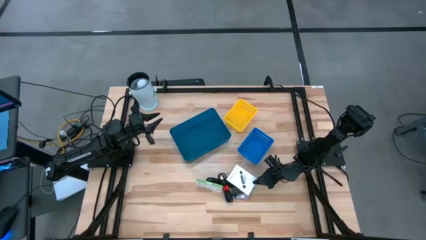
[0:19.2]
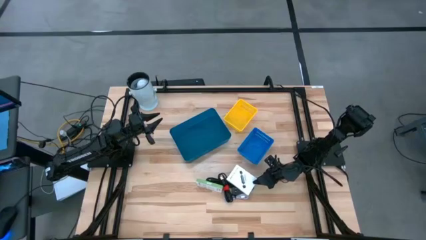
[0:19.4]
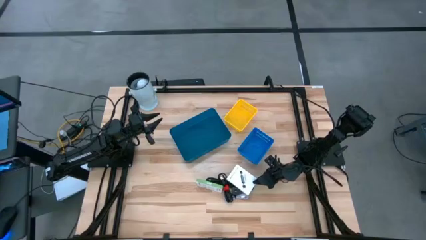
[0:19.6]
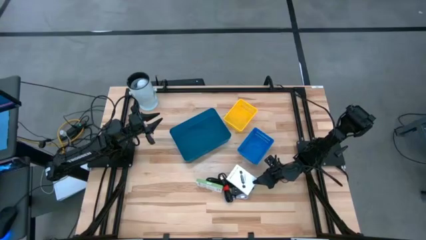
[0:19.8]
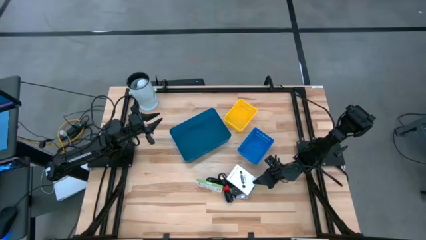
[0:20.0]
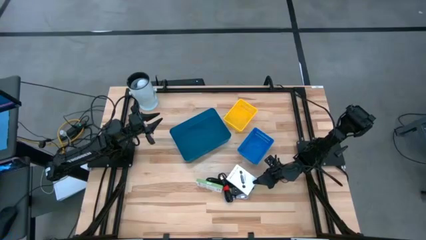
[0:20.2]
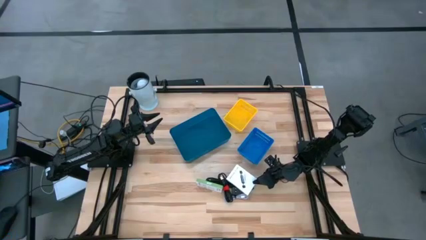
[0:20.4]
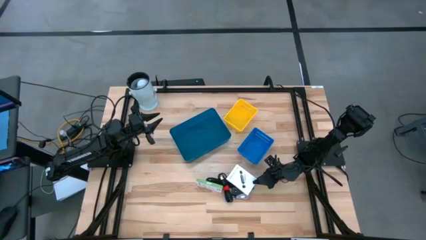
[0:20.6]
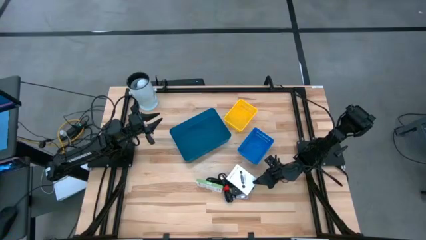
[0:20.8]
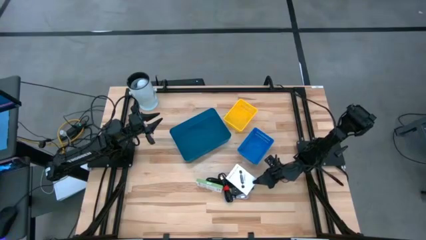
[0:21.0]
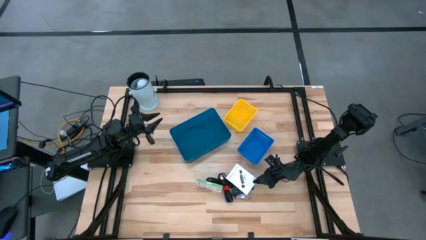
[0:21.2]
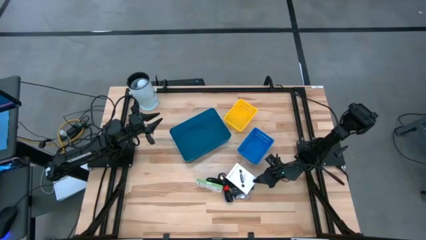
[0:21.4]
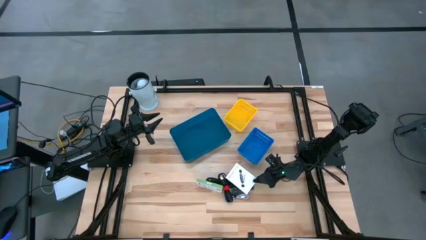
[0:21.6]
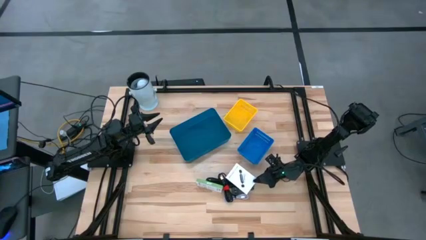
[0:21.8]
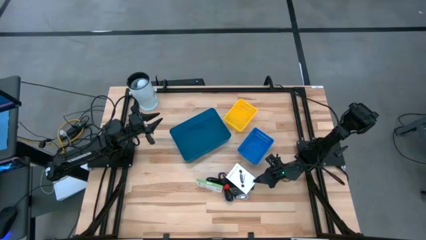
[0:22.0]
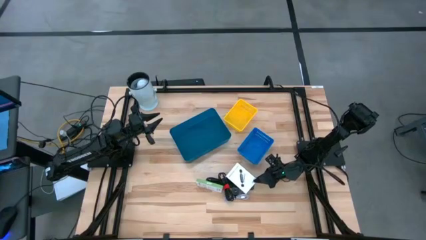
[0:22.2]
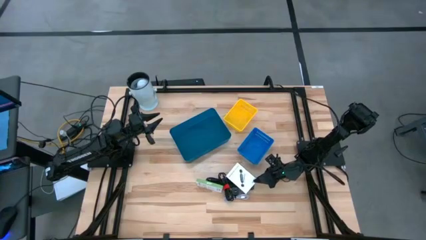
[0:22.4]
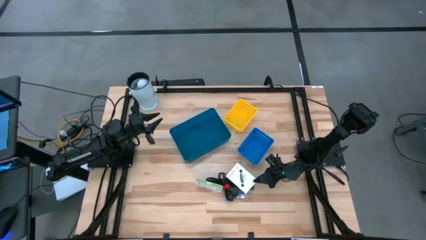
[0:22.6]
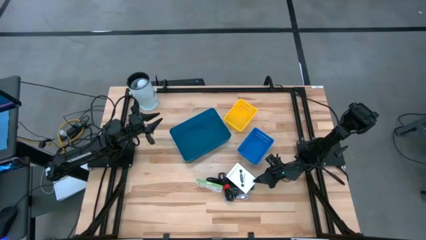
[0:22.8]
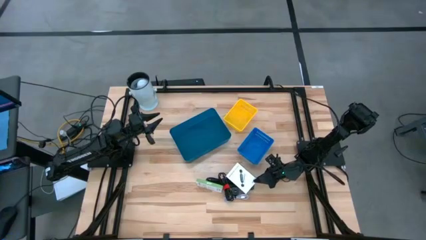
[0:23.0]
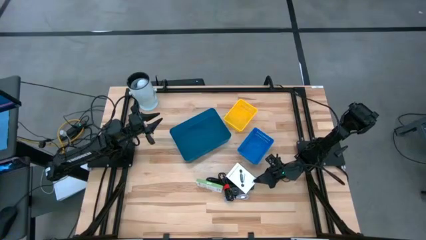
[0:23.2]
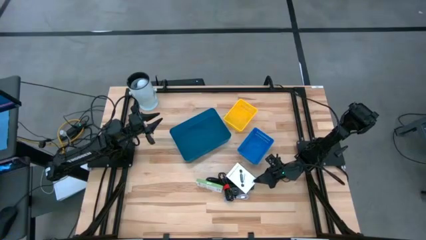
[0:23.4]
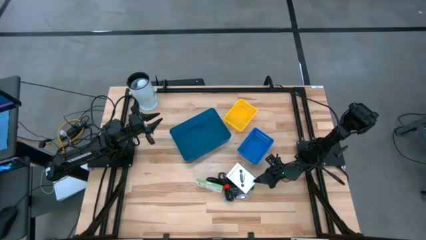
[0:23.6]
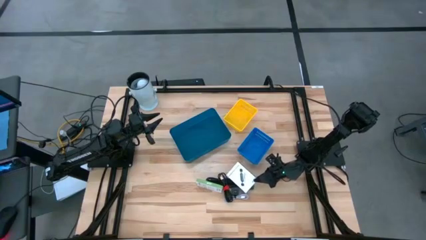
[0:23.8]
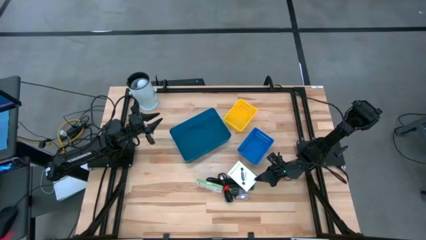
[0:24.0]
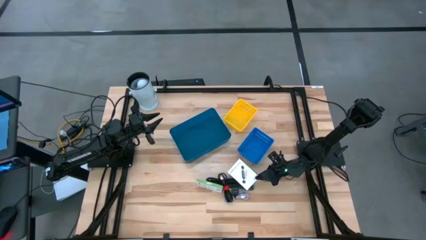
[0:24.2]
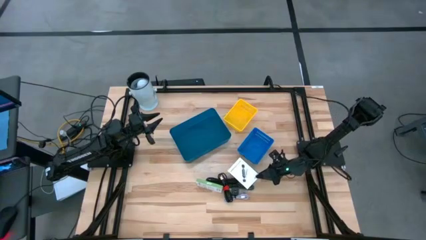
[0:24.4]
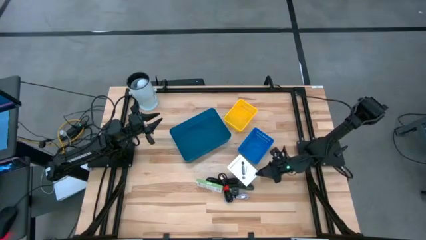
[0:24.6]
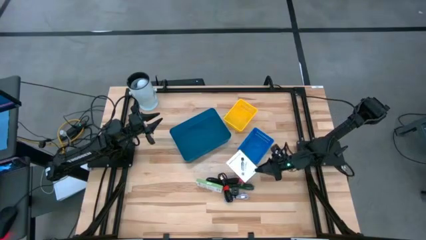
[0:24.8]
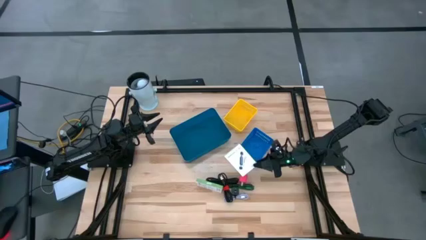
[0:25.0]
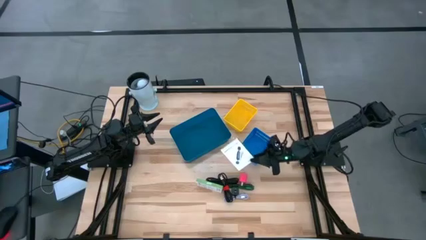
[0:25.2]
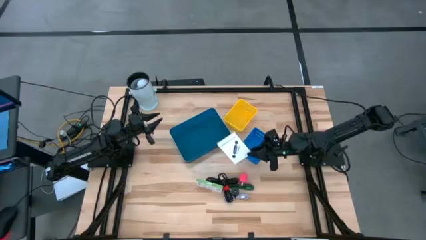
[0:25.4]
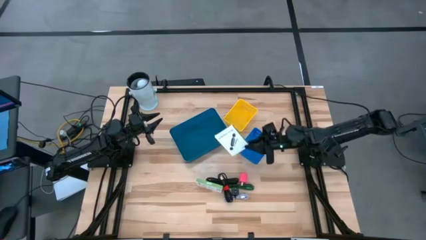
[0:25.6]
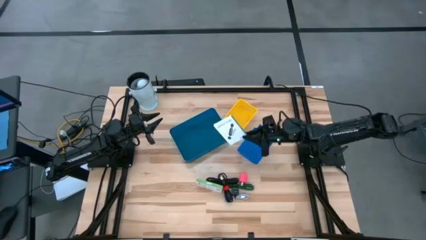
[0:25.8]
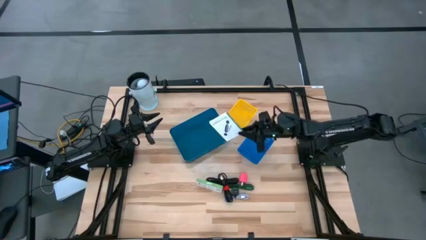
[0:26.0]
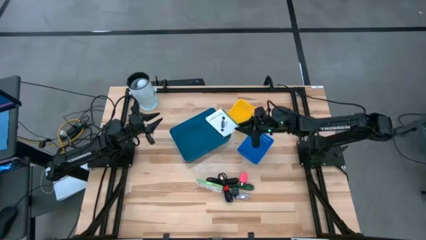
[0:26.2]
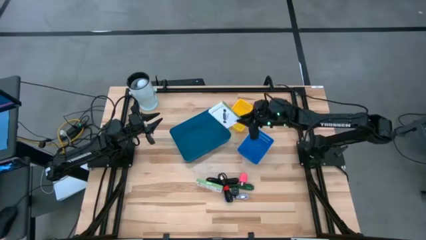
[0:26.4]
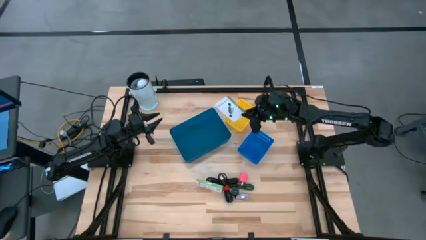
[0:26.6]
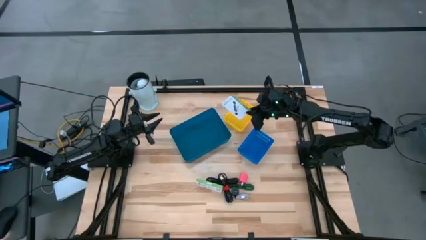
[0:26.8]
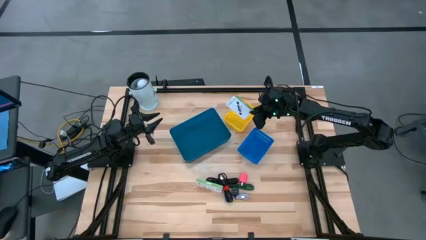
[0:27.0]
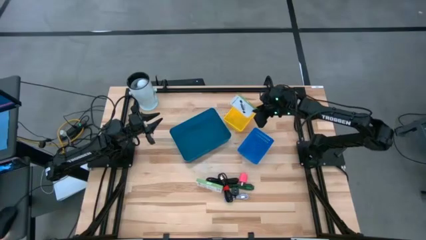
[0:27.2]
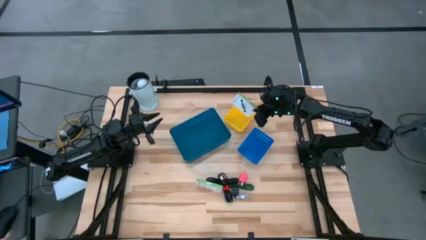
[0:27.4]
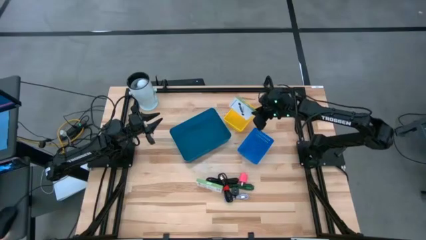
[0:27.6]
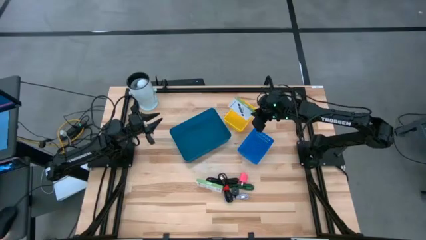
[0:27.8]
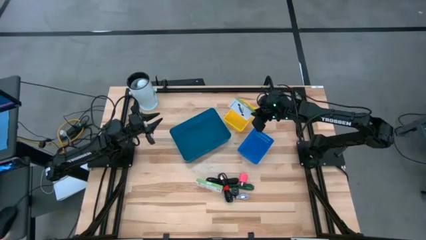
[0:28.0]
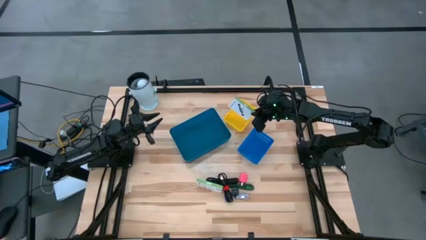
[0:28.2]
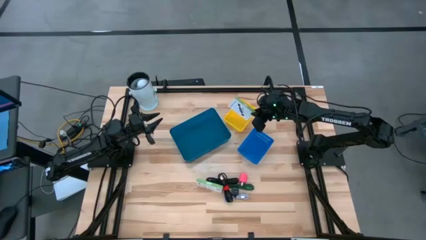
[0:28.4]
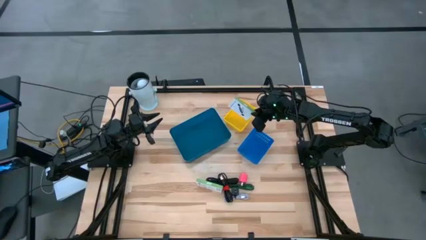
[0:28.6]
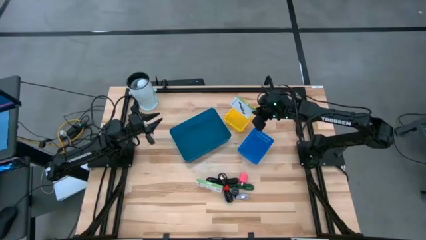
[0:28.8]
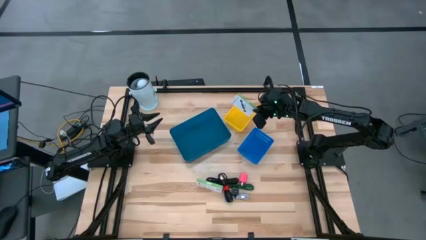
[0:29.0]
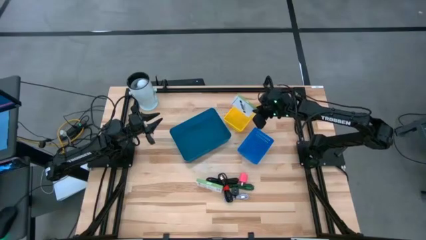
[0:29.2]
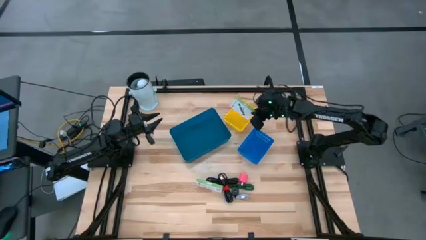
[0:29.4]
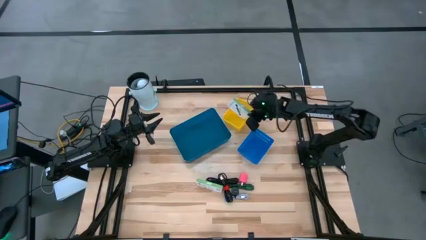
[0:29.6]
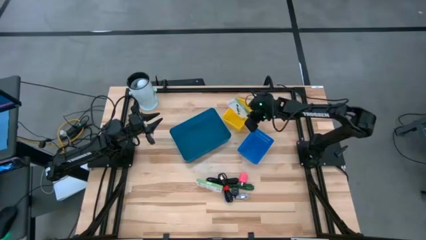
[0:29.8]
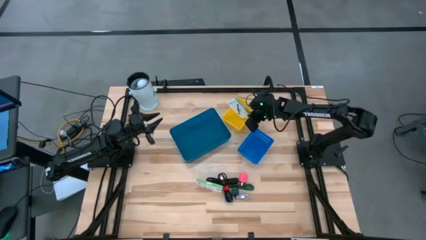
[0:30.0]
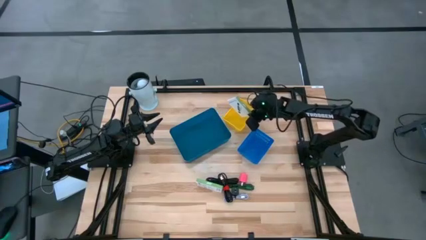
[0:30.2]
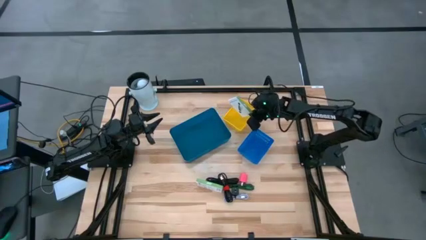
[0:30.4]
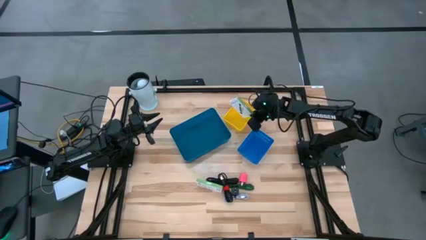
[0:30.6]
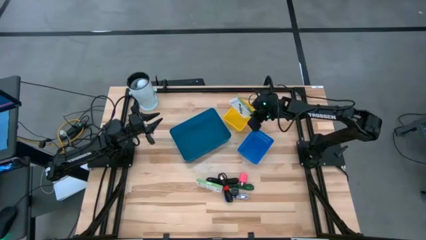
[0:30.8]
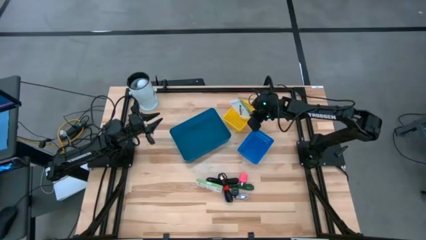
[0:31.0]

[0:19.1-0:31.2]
Task: Pick and place items into bin
Put the right card reader box into the yellow bin

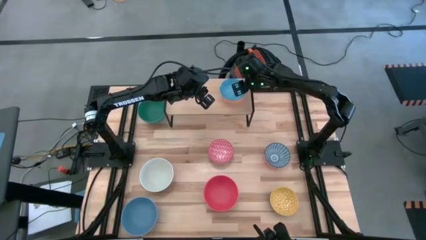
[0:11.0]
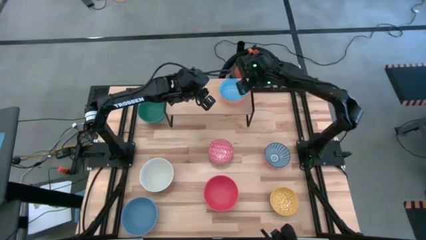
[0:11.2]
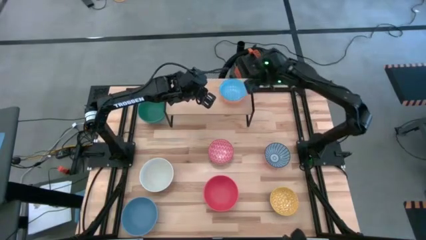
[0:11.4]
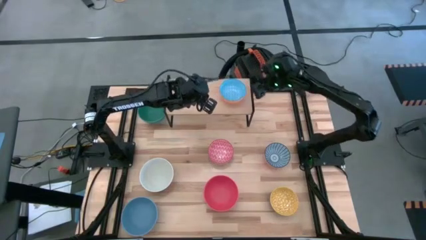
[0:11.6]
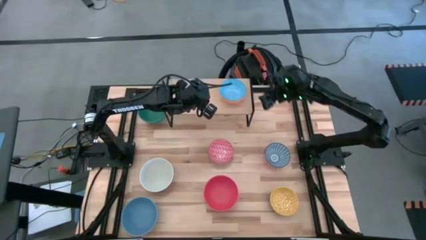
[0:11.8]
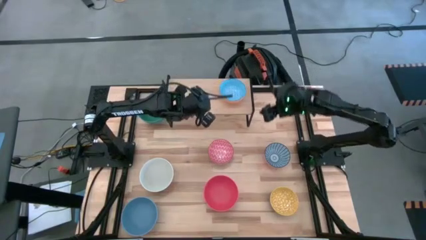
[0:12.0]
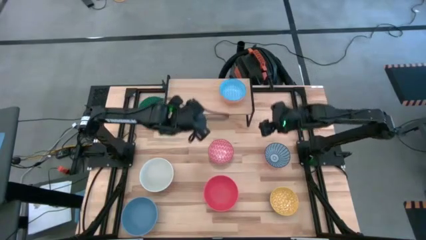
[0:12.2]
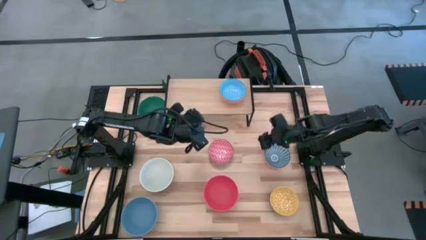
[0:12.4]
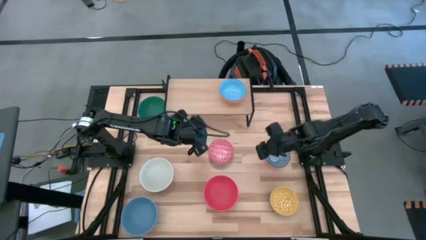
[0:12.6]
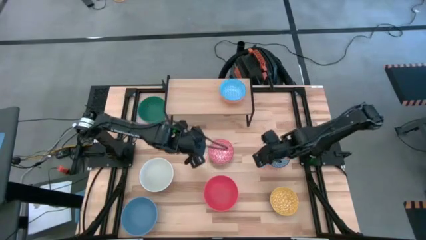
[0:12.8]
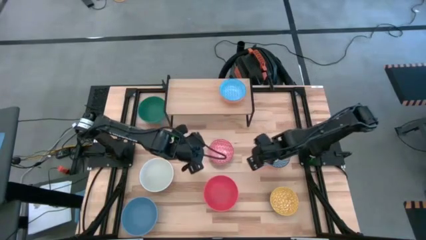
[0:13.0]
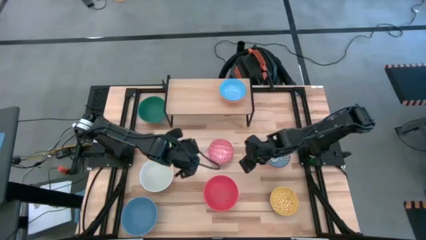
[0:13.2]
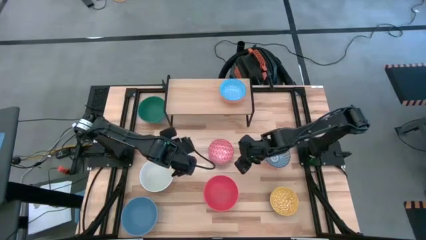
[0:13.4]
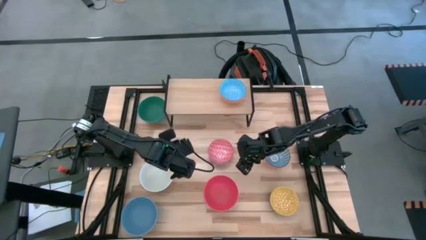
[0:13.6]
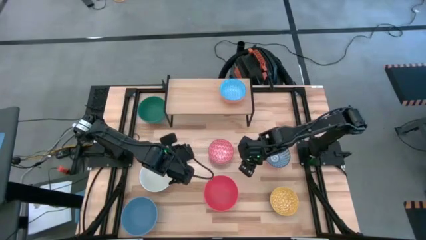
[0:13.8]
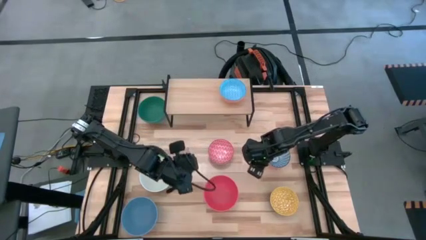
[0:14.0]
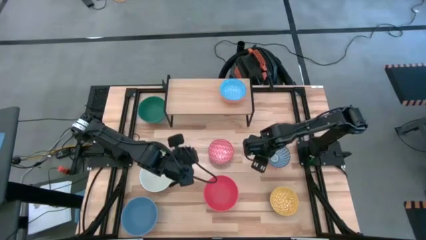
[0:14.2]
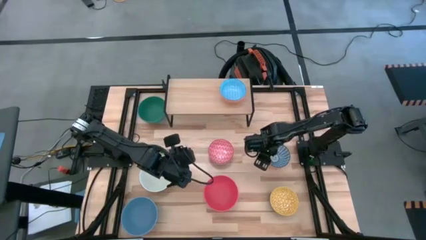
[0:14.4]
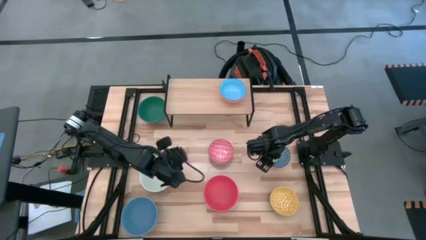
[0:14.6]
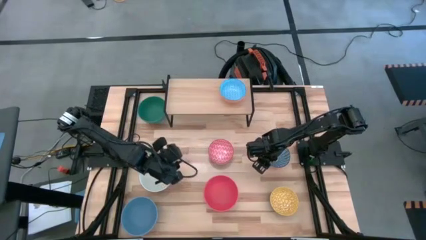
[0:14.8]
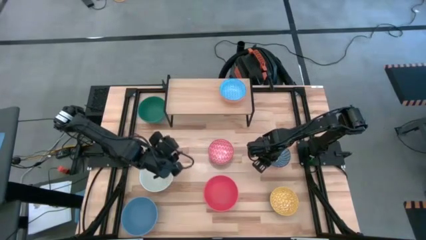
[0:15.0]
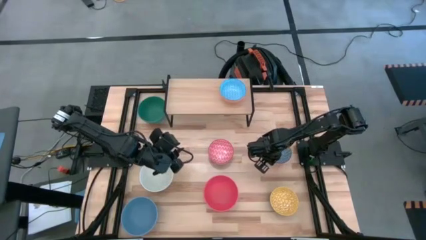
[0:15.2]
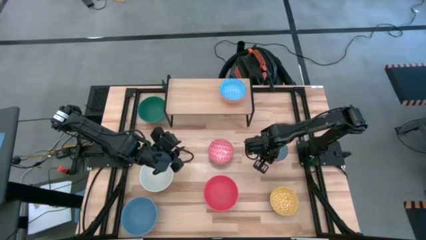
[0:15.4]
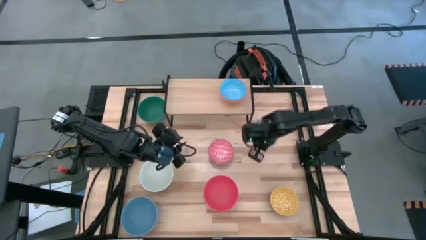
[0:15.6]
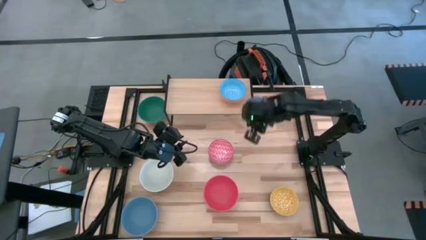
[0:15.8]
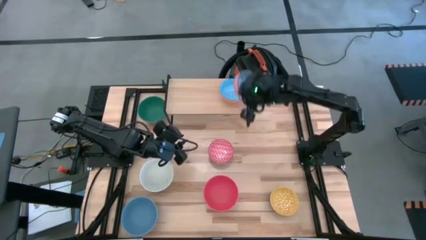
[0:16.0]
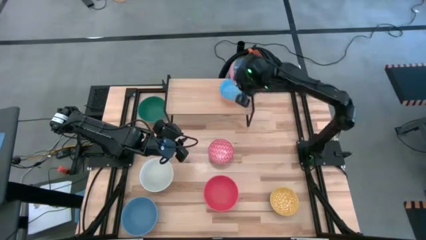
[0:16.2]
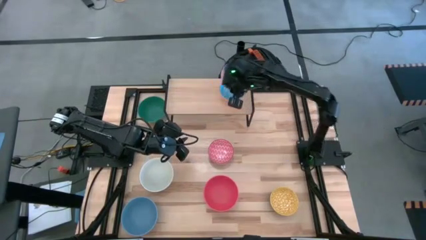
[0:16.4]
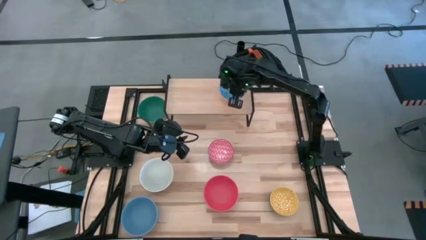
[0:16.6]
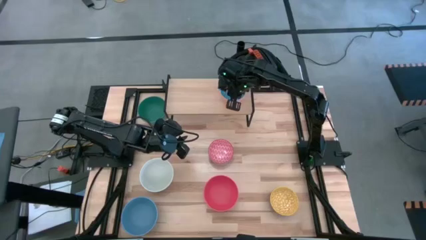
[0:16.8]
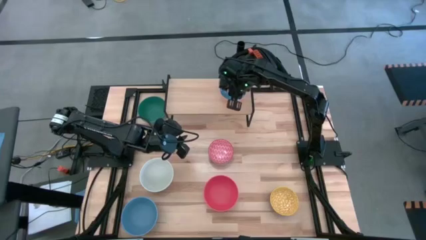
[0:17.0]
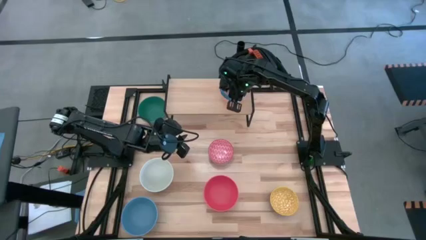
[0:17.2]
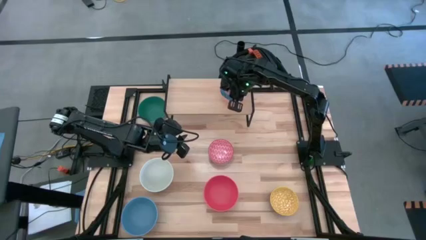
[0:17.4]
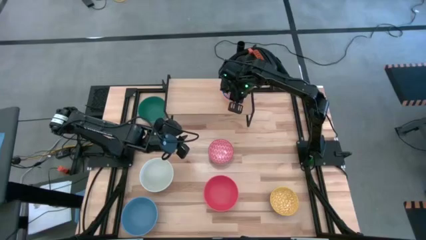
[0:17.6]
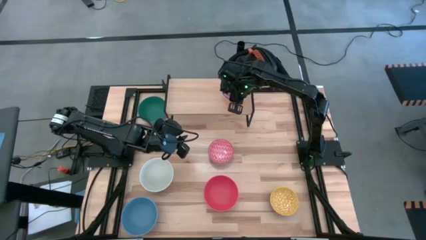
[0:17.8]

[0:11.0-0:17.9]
Task: Place and stack bowls onto a shelf
Stack the dark blue patterned bowl on top of the blue patterned bowl on the shelf
